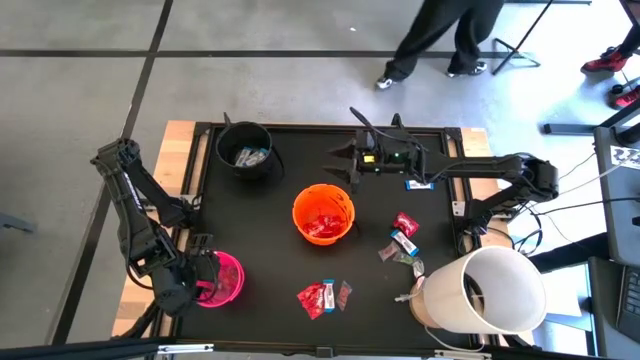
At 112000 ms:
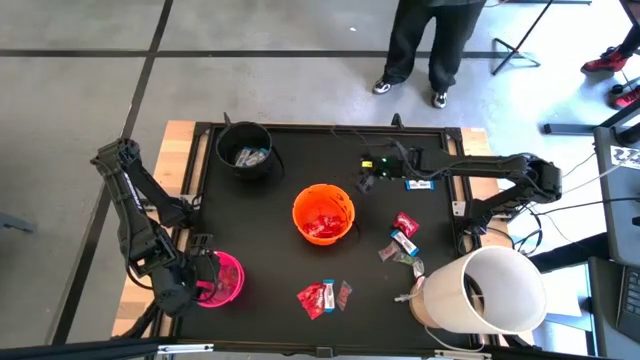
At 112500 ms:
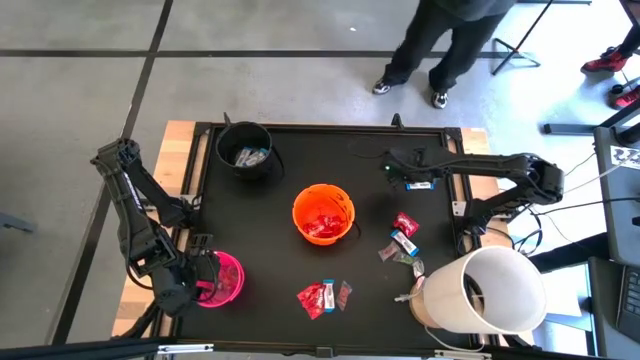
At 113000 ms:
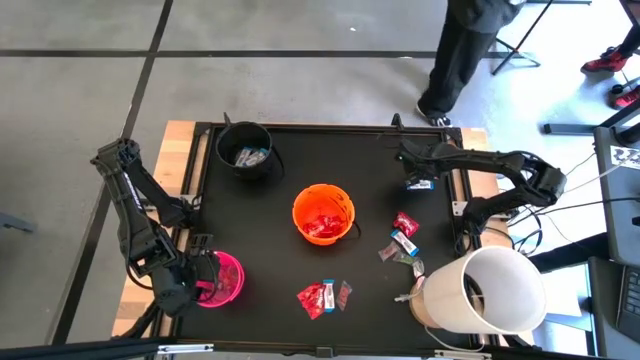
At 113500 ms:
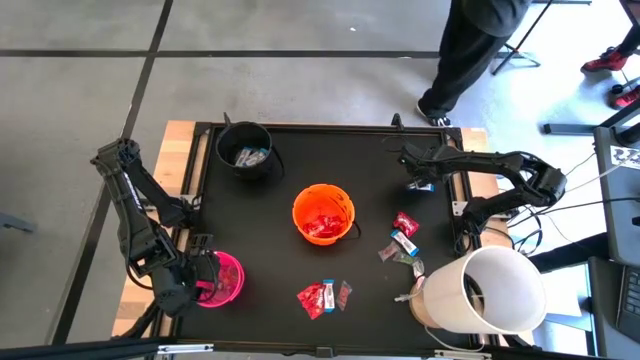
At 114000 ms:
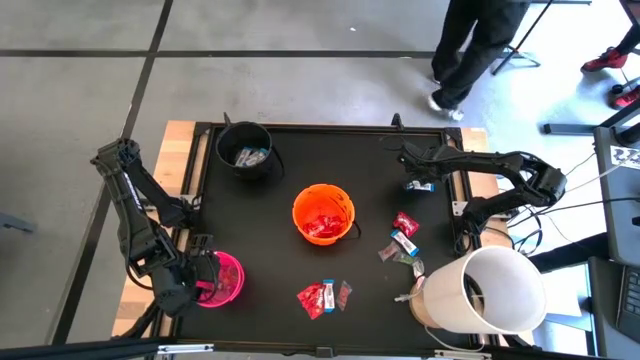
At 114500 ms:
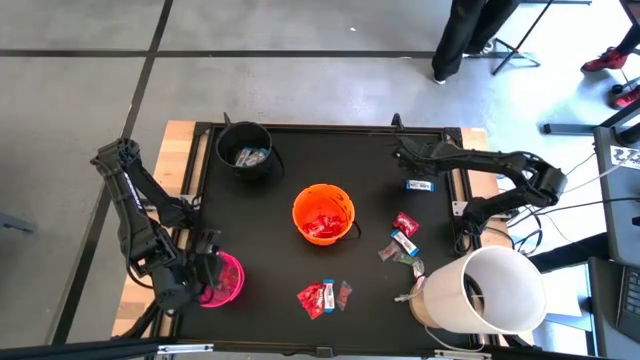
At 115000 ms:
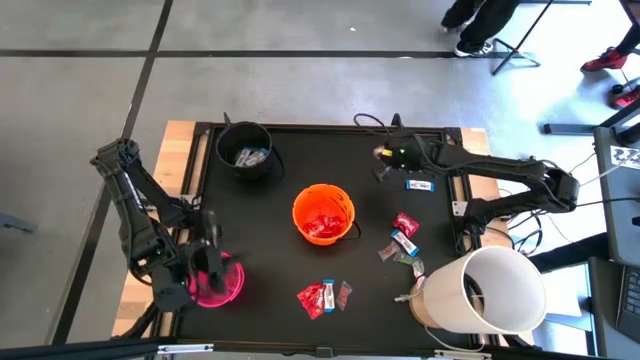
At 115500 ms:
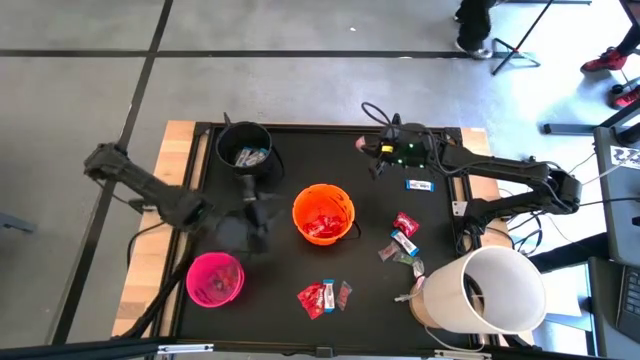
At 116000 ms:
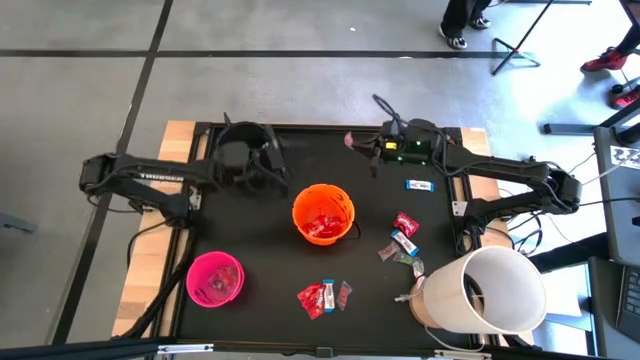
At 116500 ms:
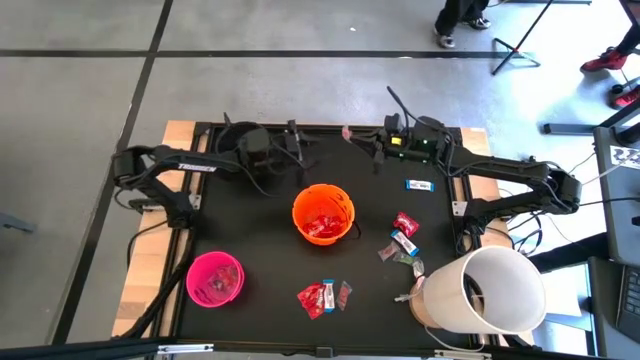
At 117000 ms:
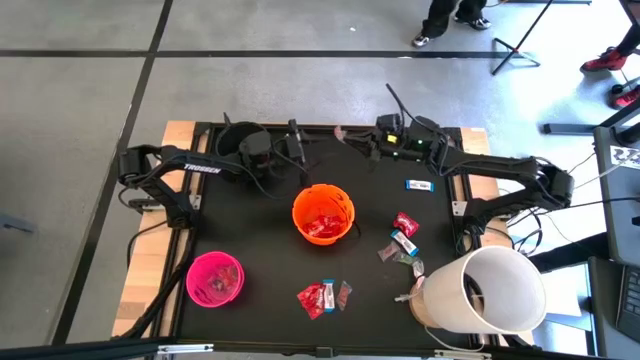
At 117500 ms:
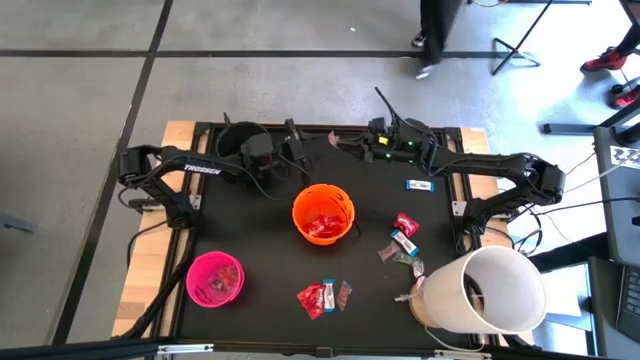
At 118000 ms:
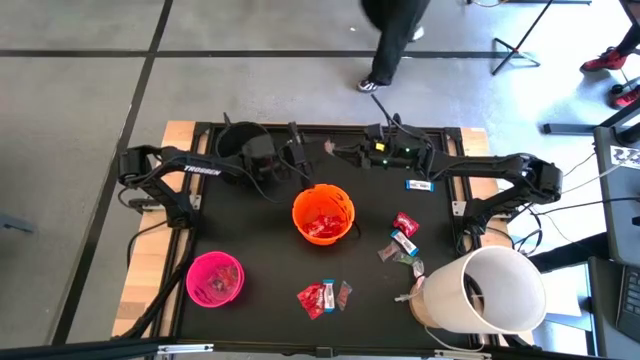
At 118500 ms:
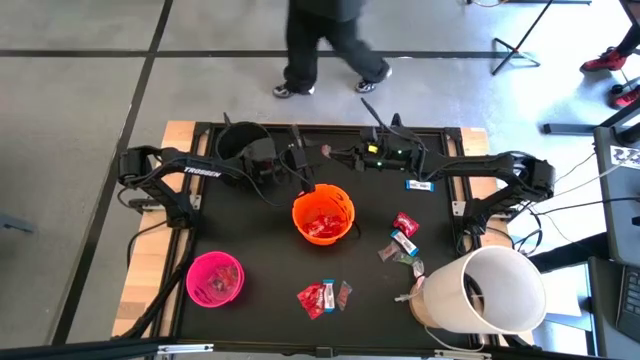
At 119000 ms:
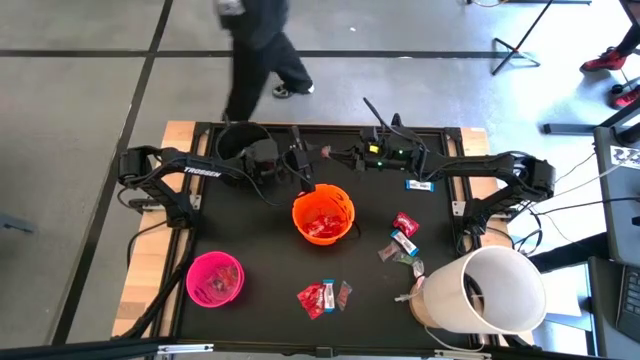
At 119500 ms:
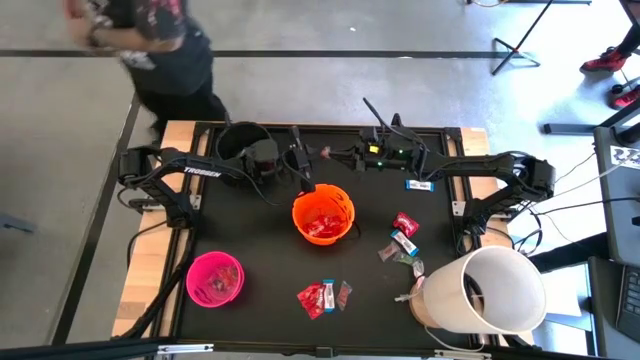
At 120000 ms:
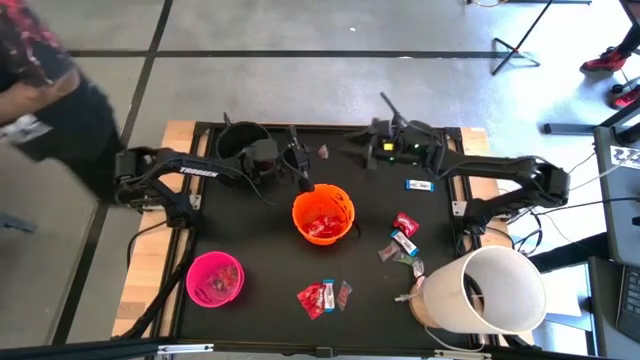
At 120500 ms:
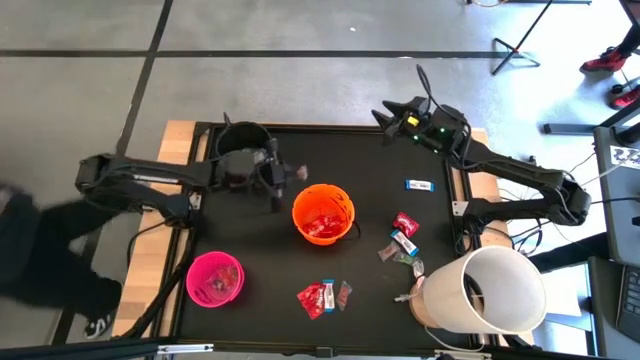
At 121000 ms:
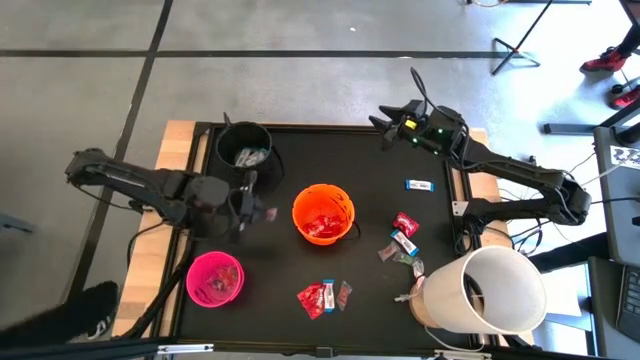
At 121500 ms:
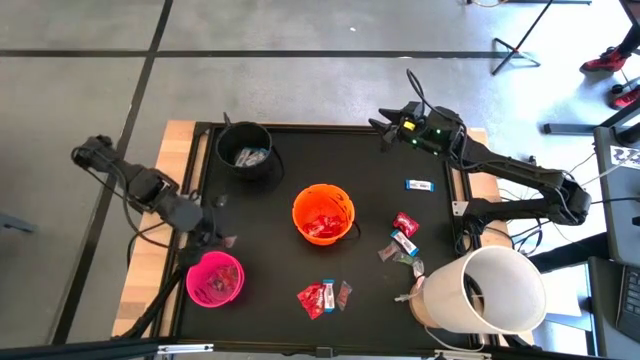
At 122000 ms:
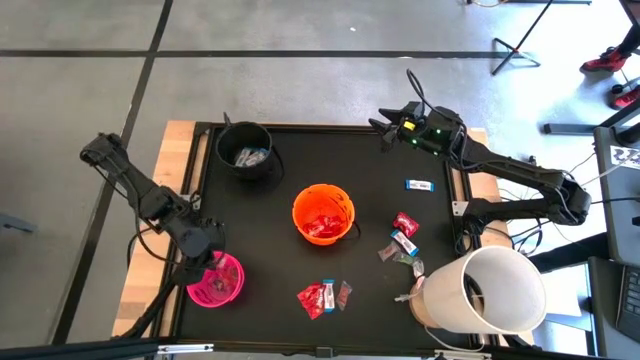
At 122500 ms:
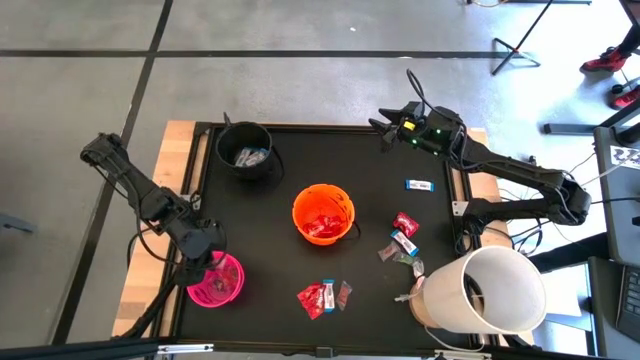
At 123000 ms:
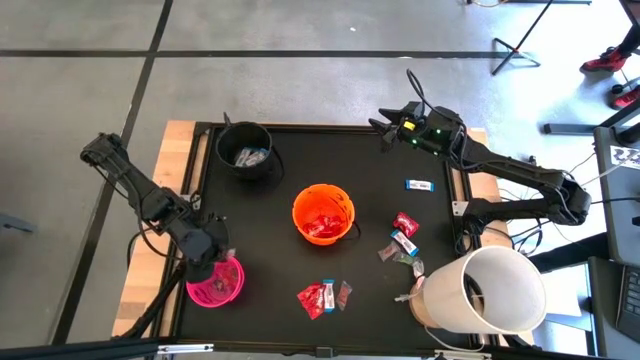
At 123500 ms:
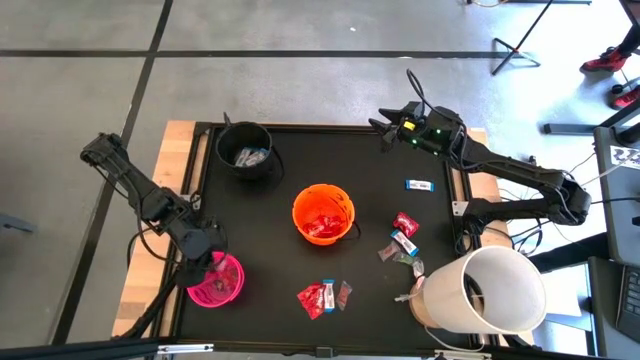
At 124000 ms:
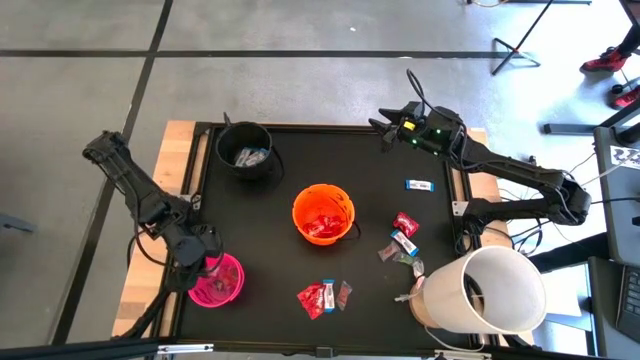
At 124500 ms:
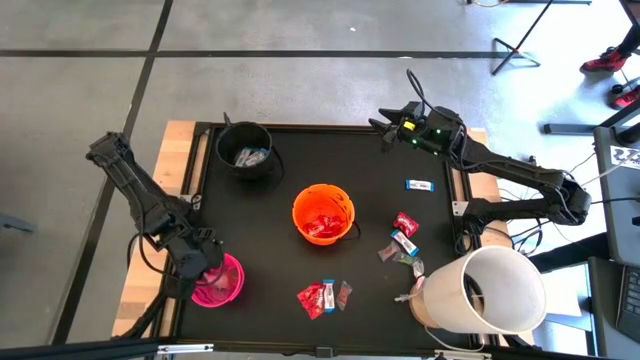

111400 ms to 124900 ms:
Task: Sort candy
Put the transparent candy into the pink bucket

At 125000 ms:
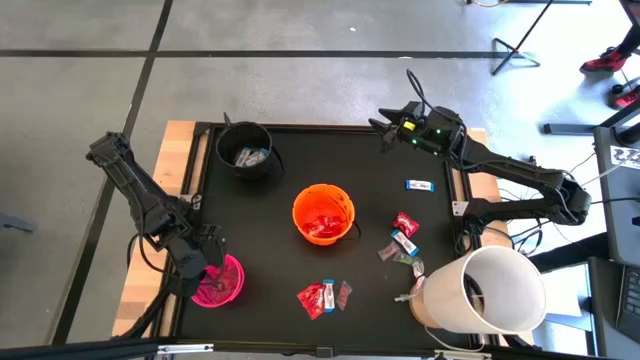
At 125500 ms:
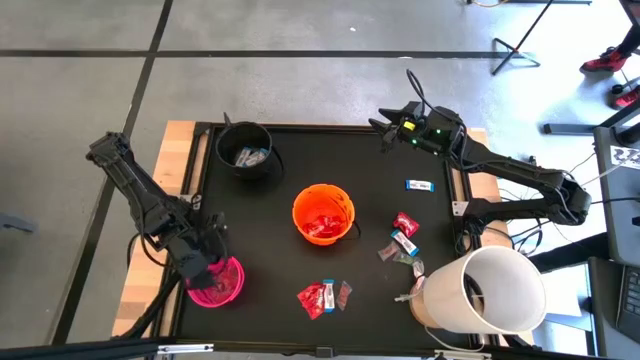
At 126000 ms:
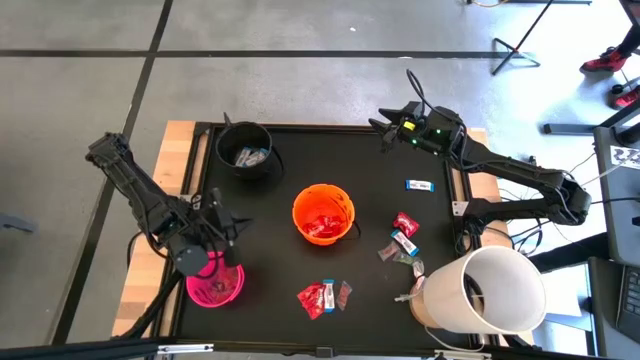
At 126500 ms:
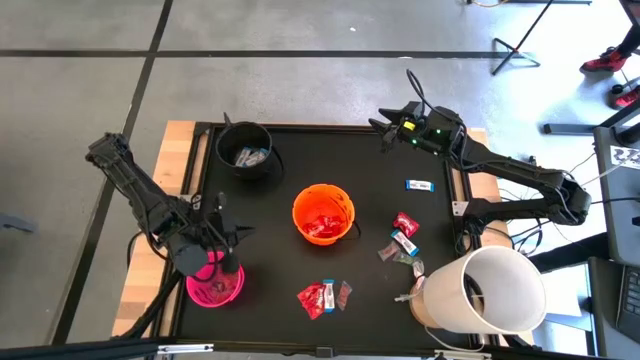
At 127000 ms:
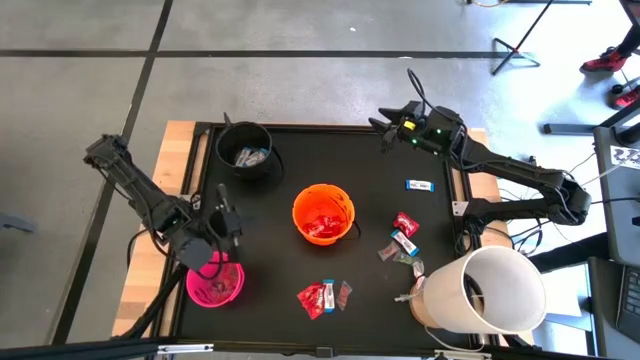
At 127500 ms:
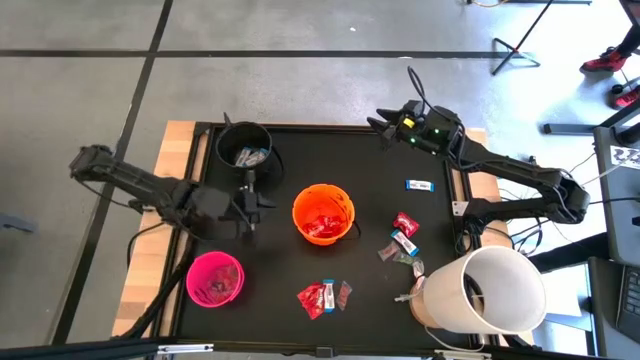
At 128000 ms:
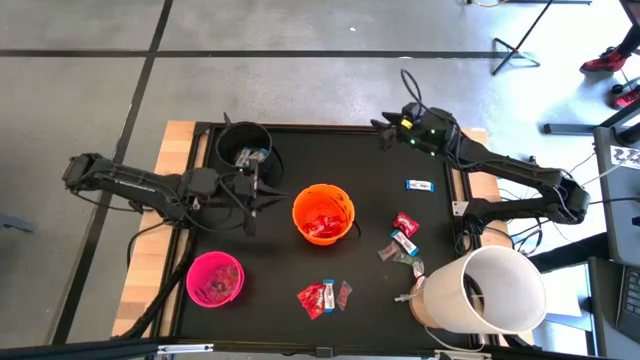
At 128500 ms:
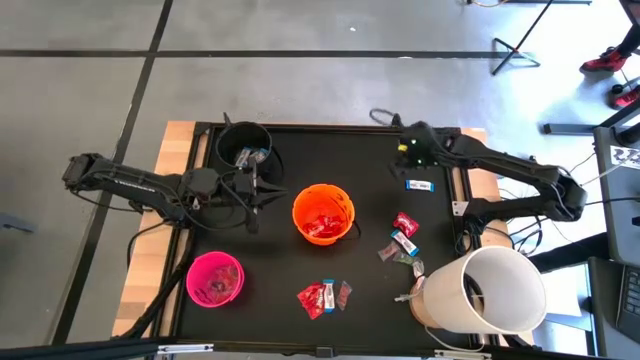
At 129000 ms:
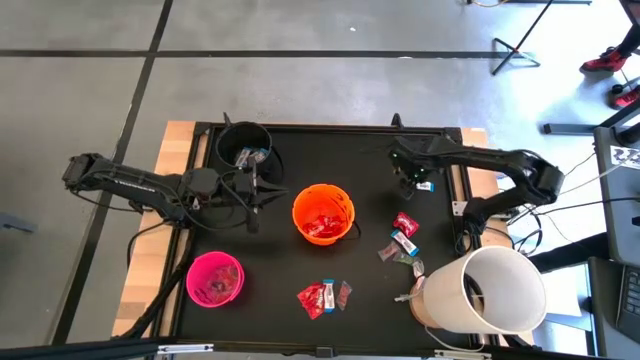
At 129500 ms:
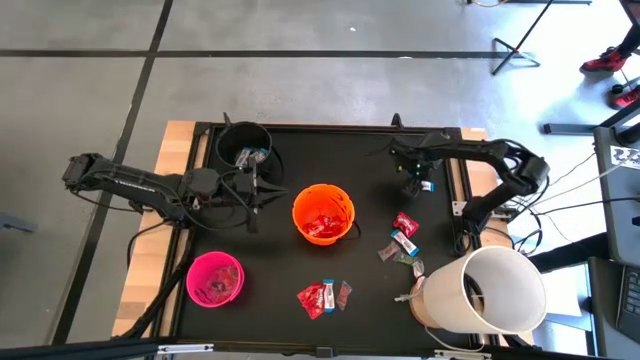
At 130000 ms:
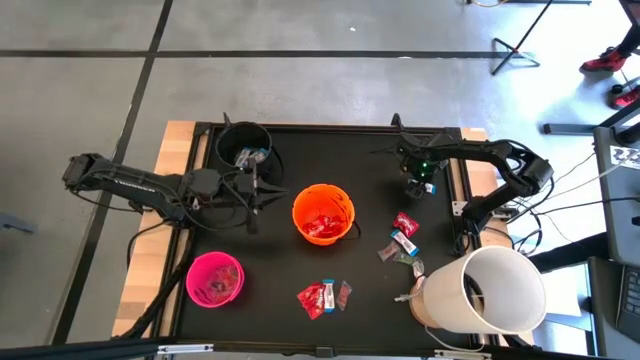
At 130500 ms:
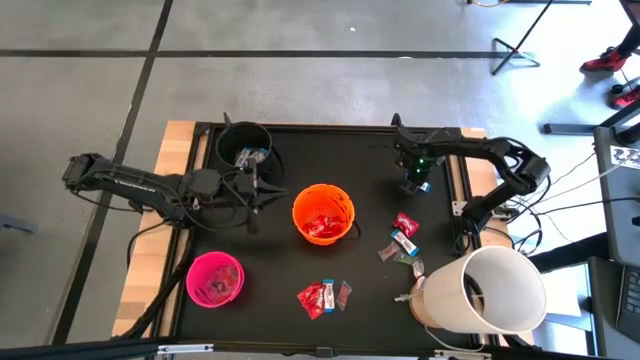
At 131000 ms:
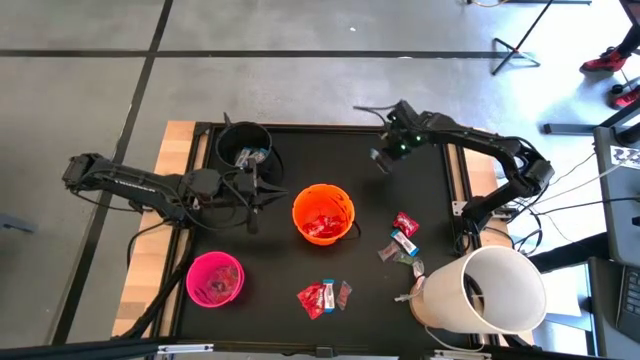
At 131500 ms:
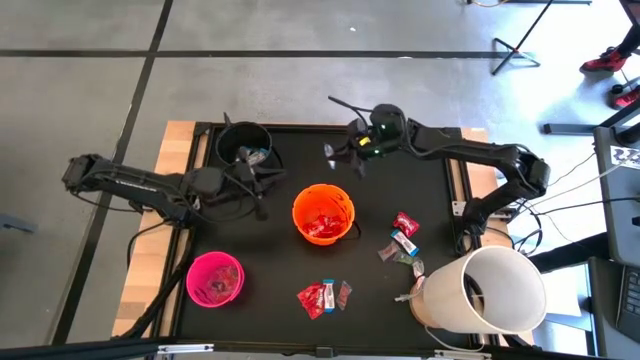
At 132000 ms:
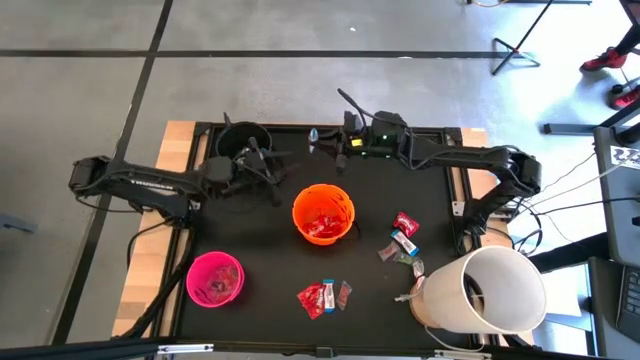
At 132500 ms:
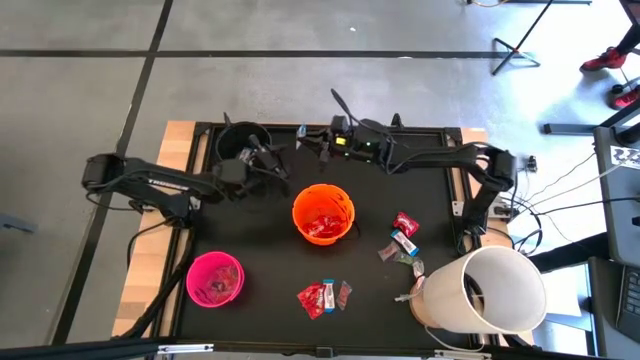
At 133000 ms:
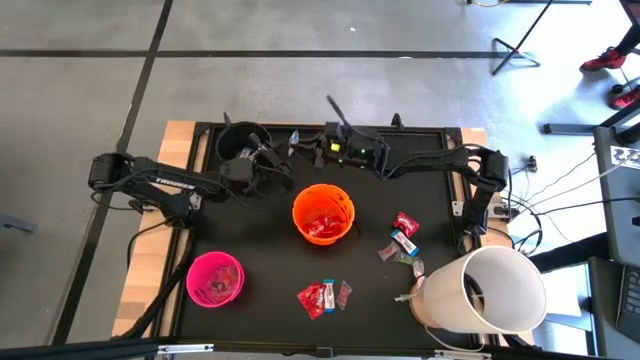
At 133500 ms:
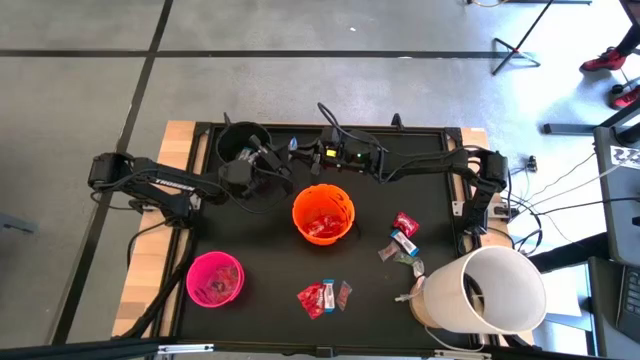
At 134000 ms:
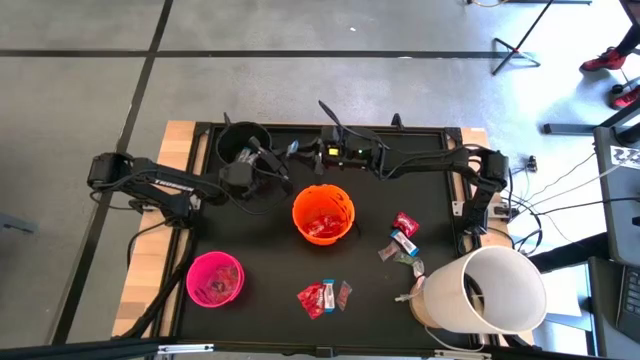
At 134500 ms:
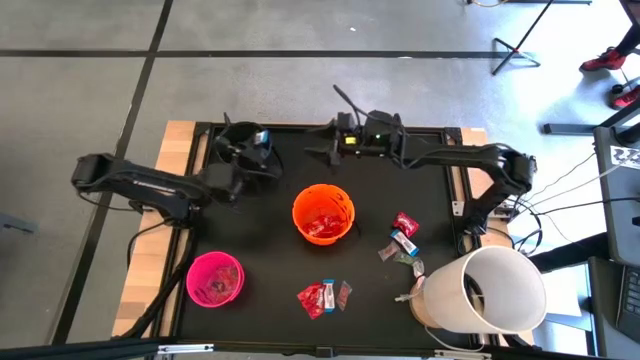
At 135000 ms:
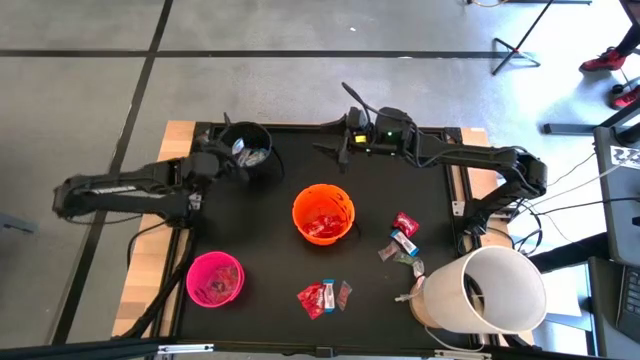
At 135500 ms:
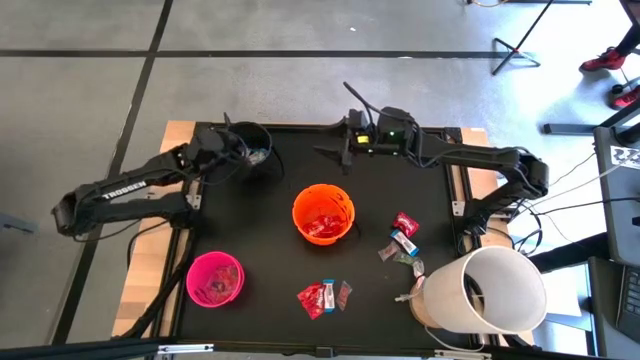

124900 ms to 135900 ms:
Put the white chocolate into the black bucket
